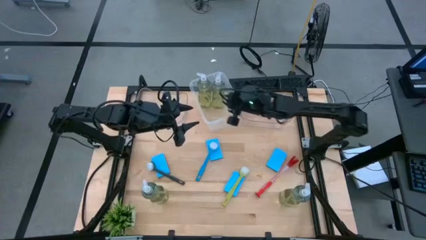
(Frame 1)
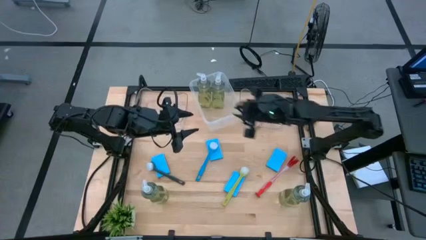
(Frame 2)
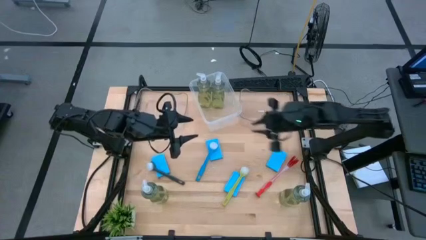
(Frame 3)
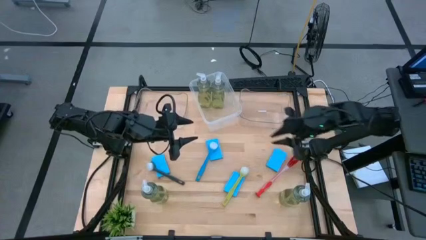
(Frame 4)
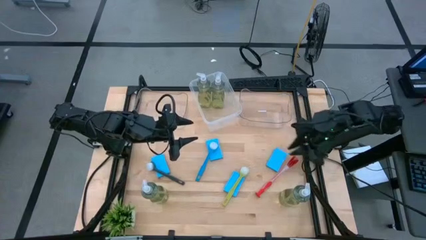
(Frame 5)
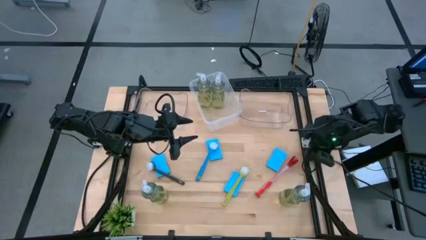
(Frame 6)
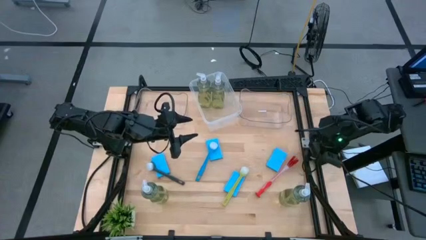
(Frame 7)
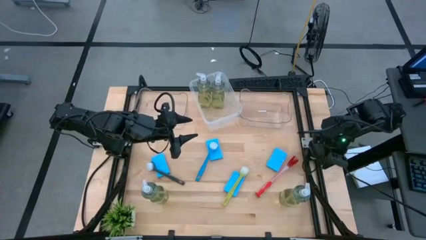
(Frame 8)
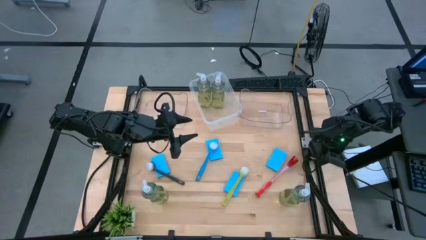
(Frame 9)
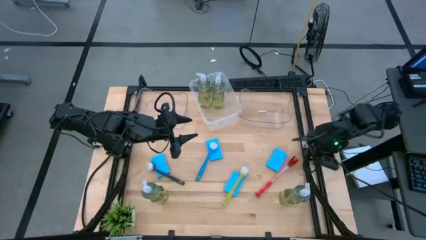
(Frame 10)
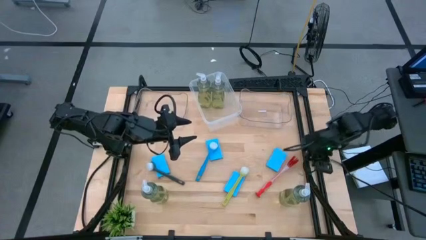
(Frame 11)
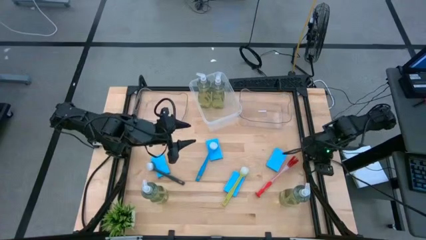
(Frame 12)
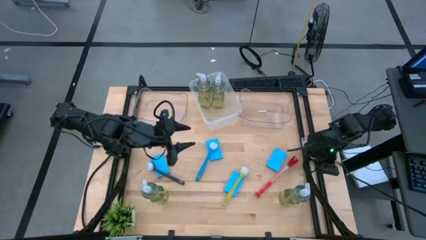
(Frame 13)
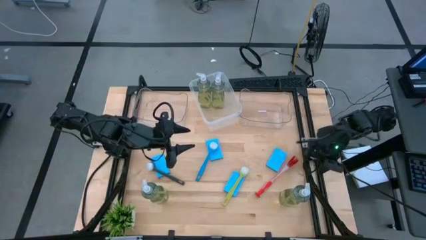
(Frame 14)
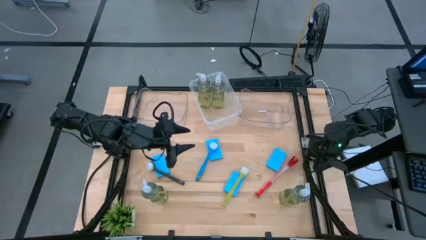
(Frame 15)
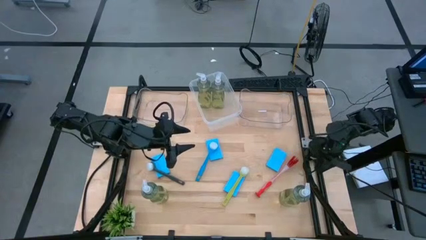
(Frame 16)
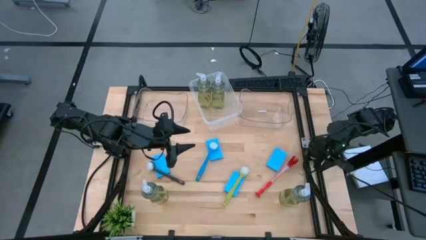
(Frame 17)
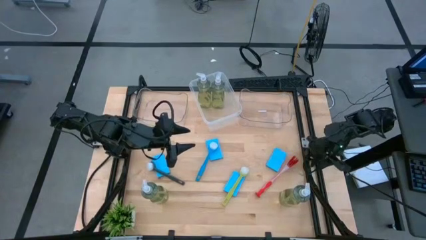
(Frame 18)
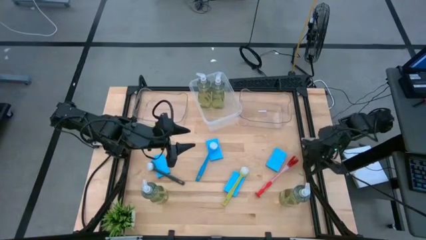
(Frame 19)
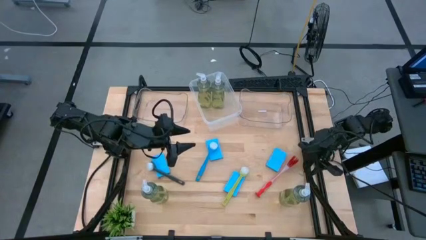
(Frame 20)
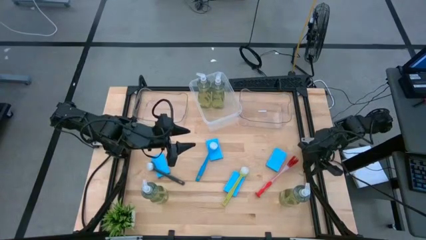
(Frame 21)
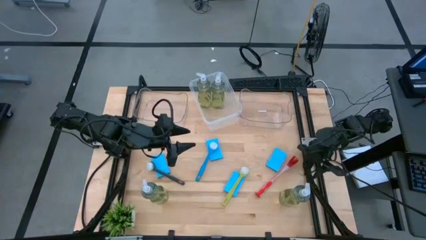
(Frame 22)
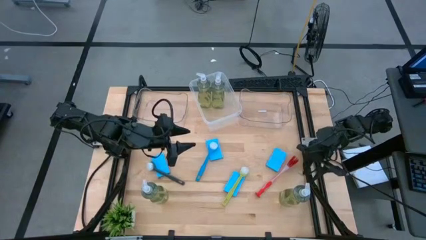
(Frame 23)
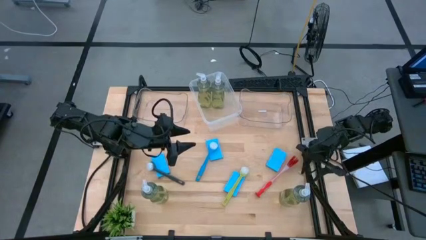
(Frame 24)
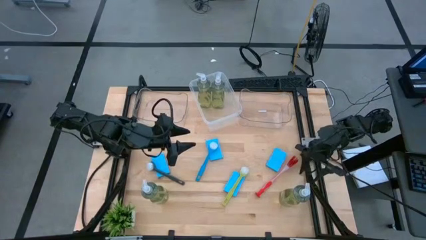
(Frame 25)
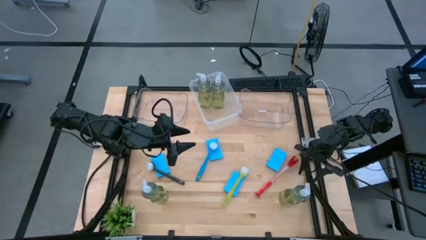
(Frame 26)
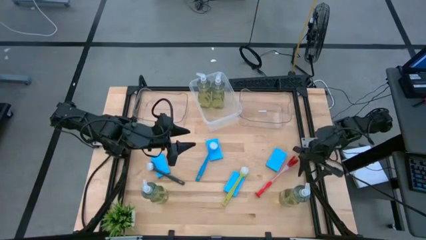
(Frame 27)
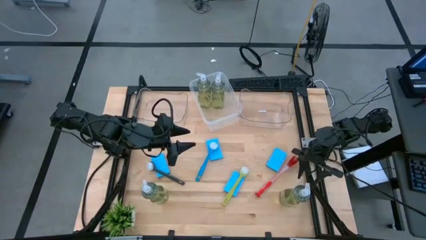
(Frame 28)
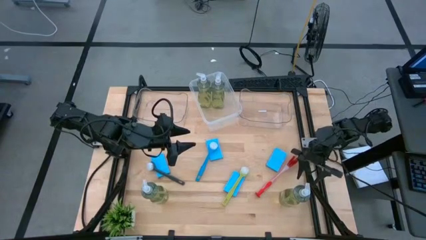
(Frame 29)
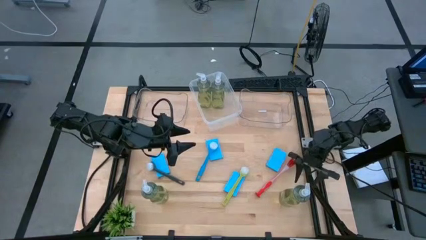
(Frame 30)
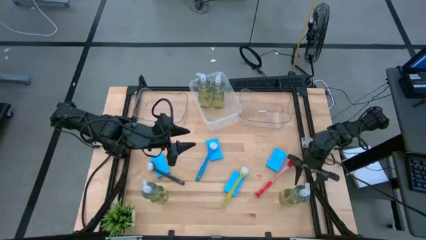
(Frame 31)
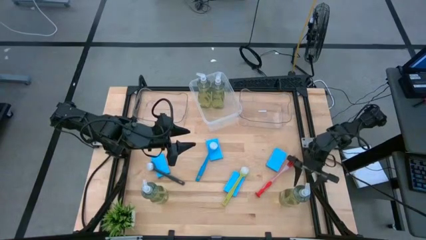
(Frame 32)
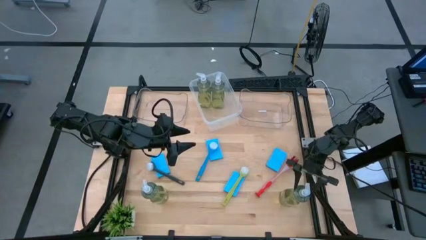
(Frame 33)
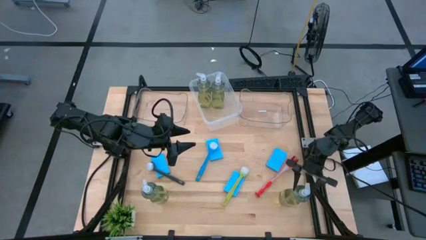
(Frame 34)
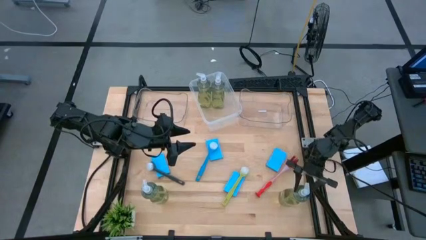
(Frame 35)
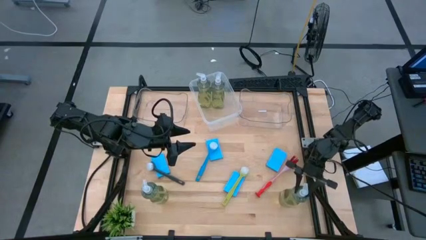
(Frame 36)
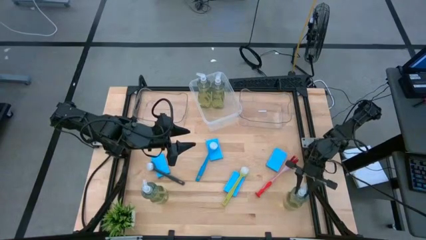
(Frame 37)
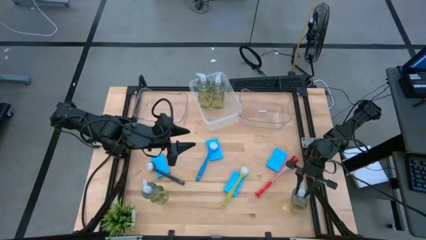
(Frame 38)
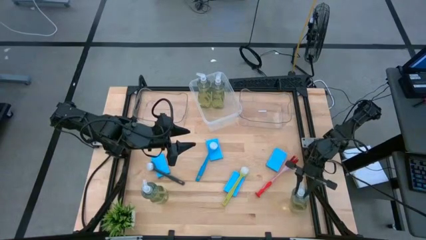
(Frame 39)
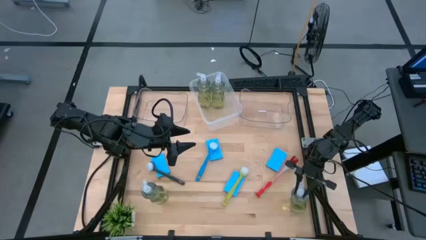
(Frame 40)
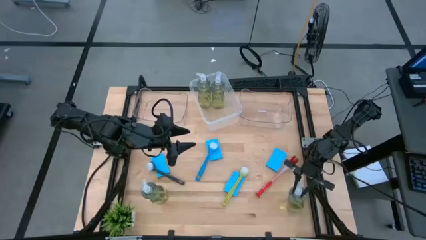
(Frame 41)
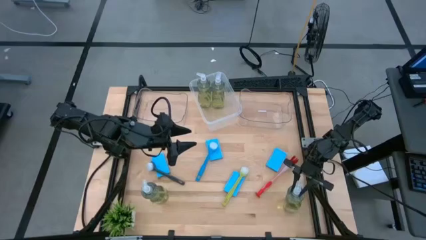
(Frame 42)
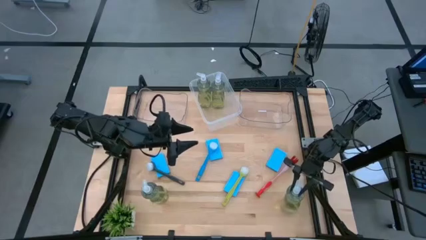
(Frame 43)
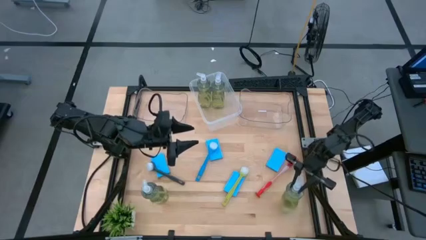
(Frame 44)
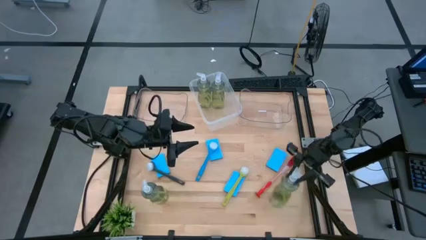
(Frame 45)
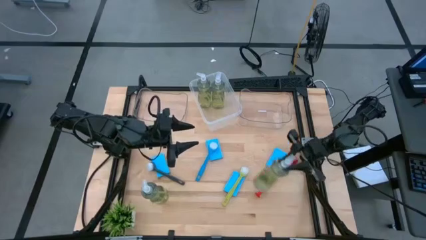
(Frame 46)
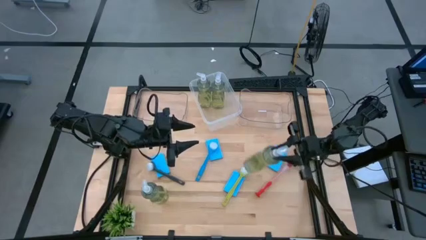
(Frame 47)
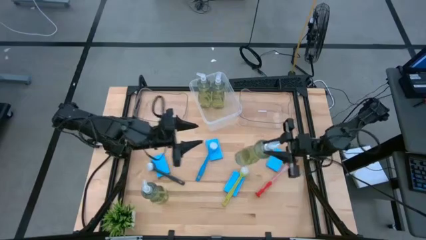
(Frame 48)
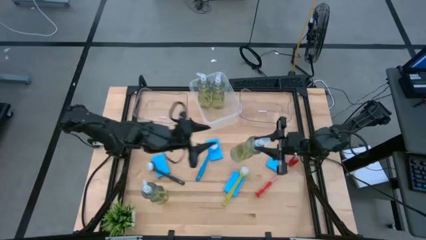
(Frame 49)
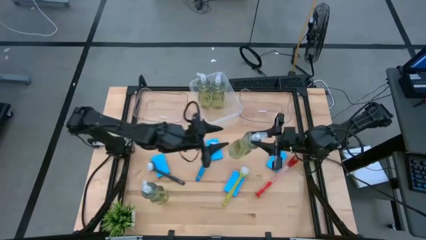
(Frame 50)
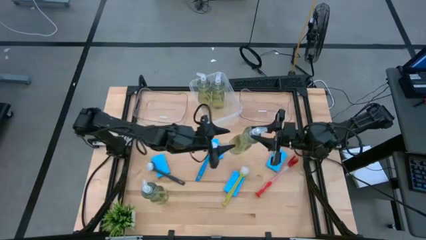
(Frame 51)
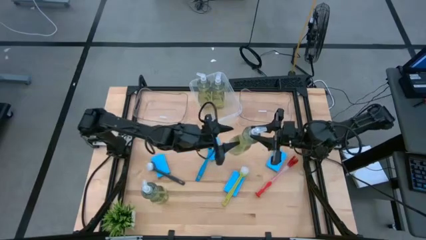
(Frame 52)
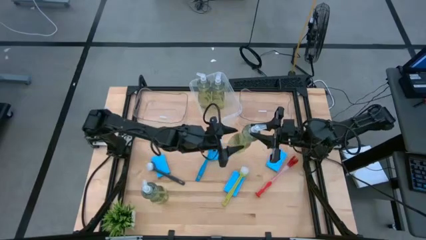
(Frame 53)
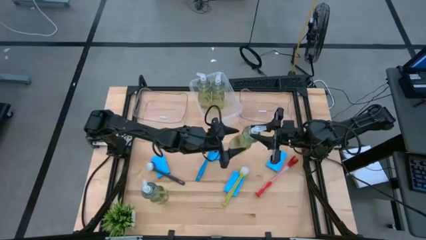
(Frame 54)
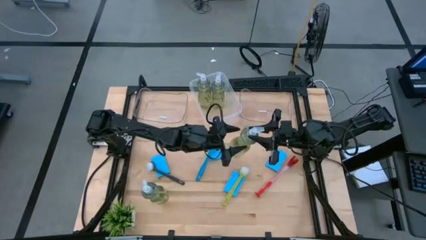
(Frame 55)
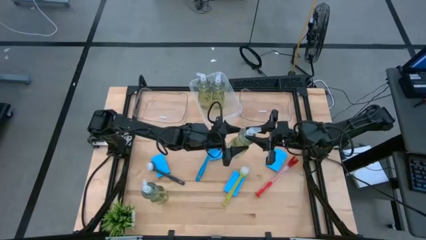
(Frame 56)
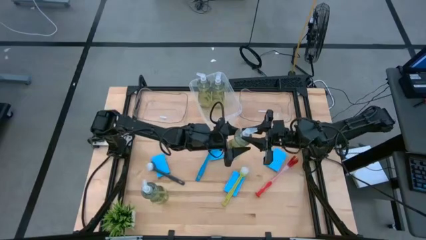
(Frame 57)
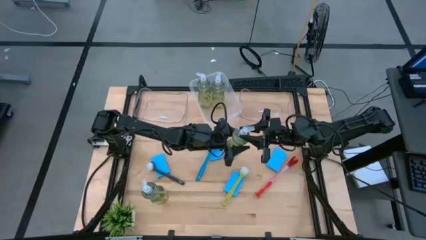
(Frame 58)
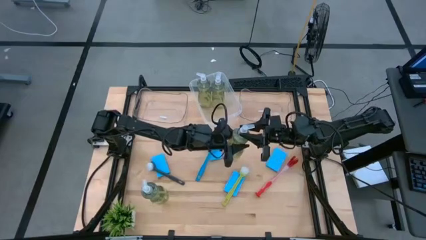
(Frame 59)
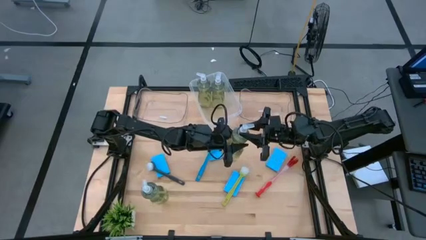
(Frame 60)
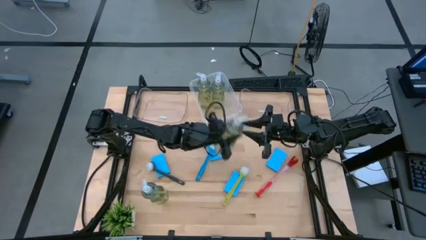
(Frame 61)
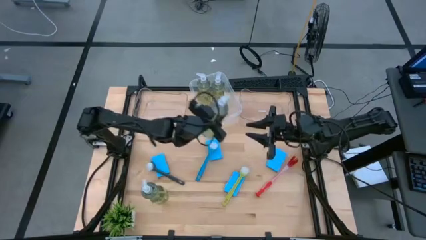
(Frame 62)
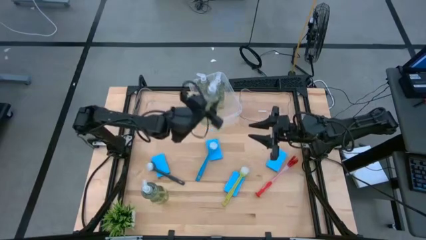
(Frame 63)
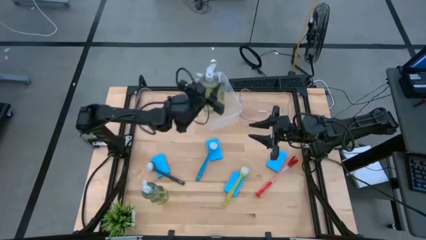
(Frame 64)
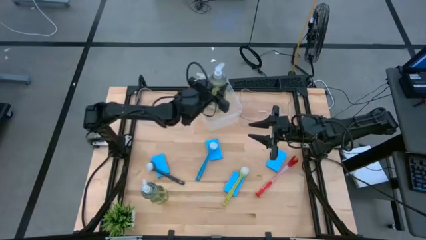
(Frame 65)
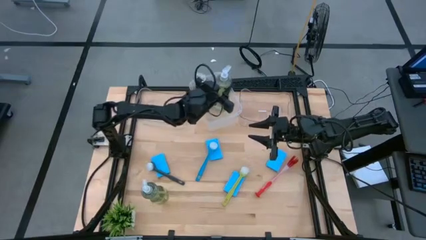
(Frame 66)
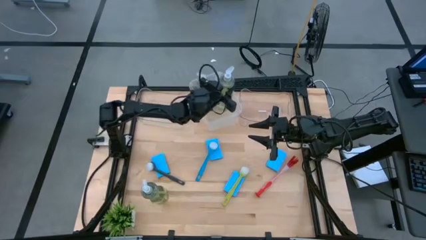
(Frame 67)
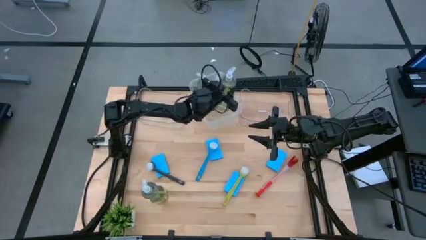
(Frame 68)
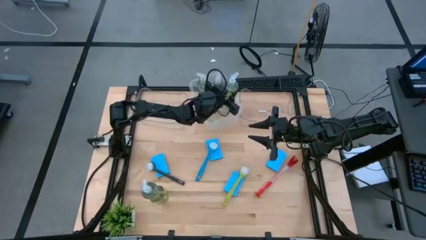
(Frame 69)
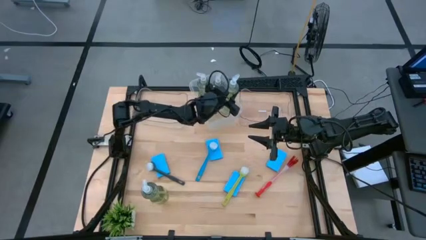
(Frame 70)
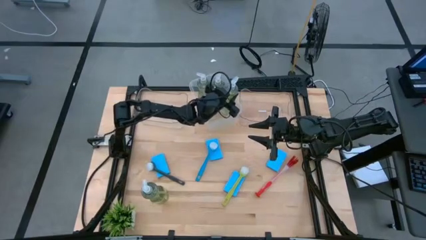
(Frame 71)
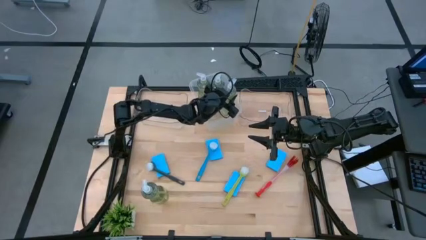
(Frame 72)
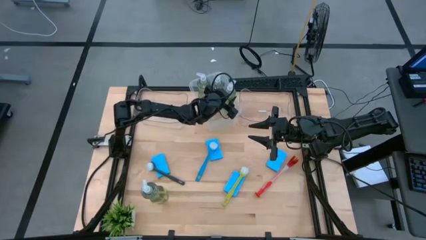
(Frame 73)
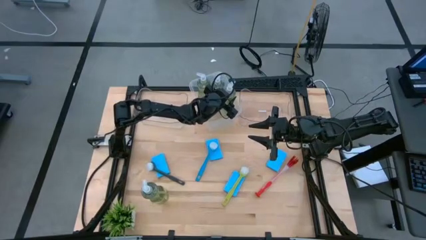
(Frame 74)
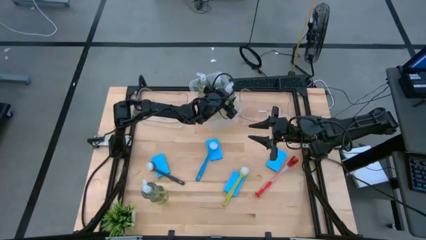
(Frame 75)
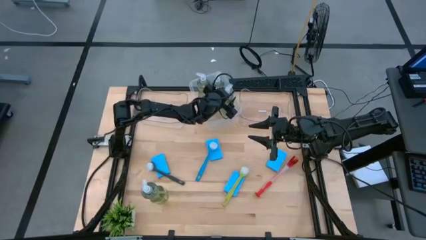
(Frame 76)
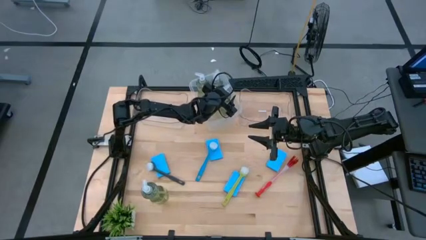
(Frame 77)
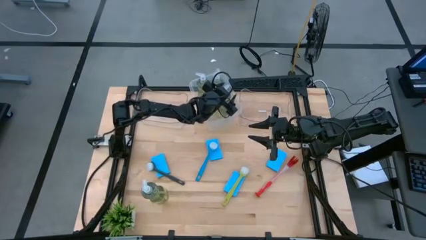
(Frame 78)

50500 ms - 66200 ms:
Task: Pick & Place Kitchen Sink Supplies
Put the dishwashing liquid bottle into the white bin
